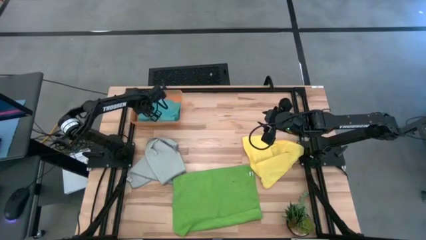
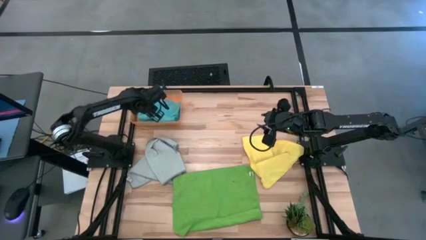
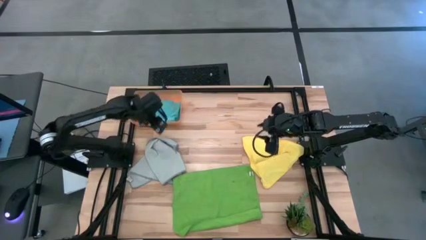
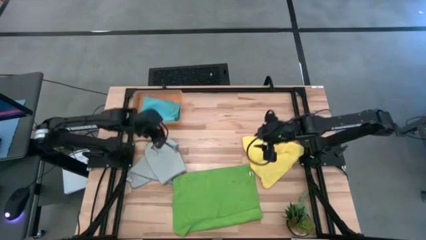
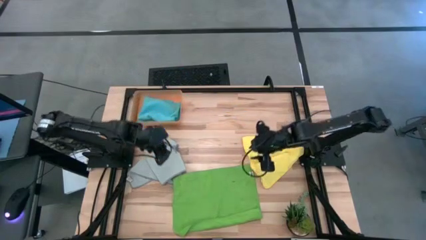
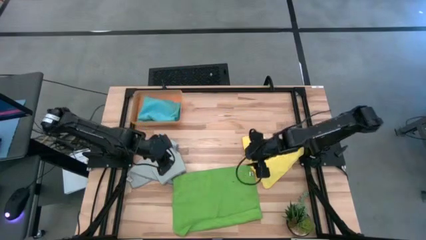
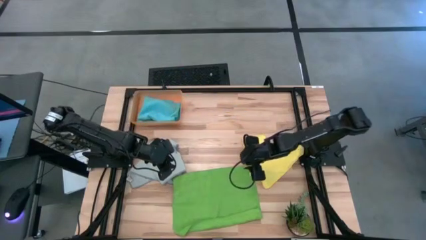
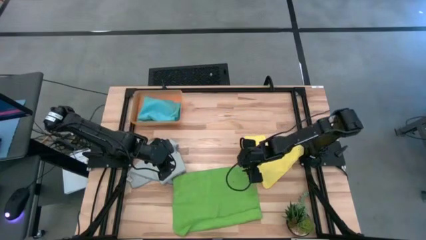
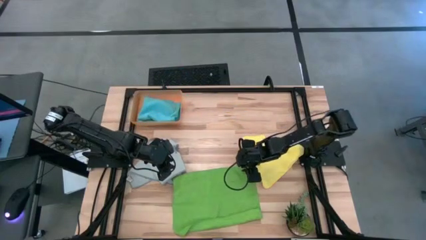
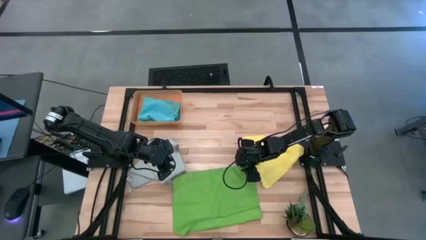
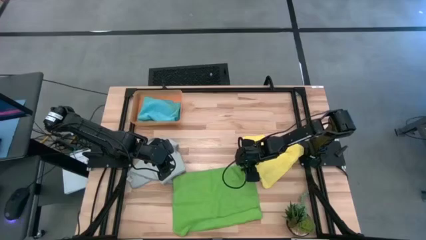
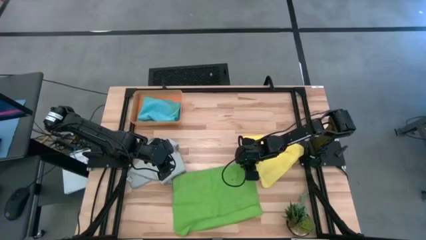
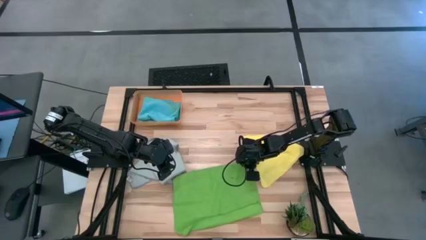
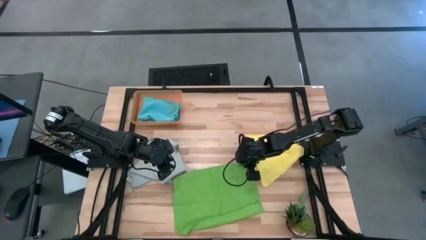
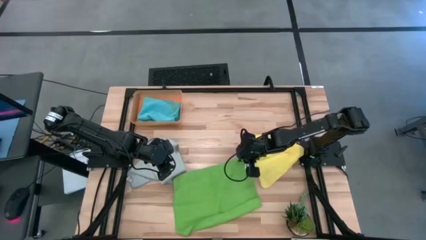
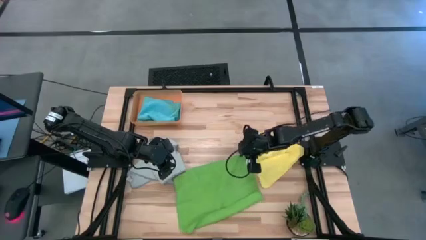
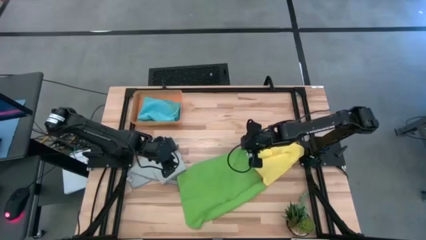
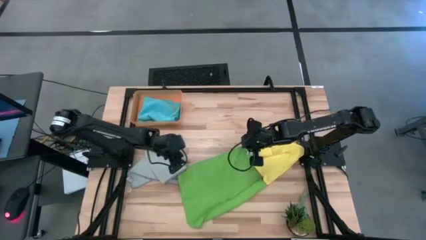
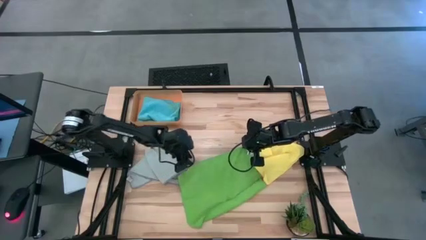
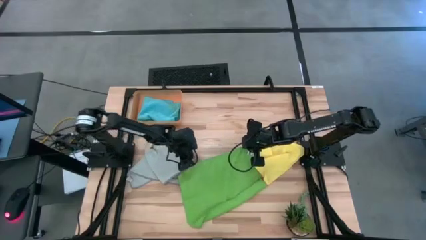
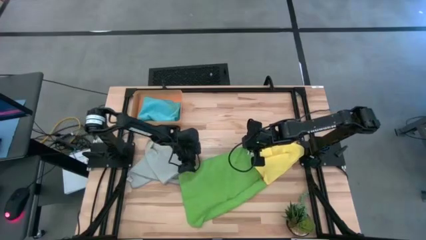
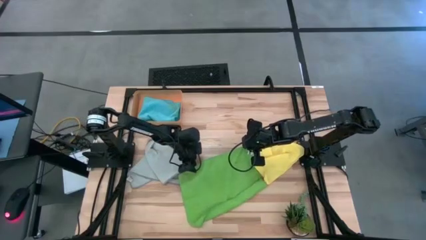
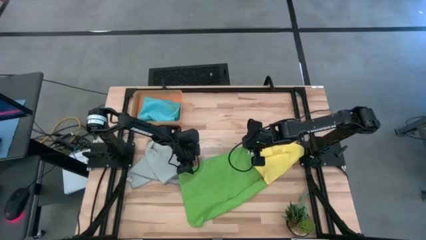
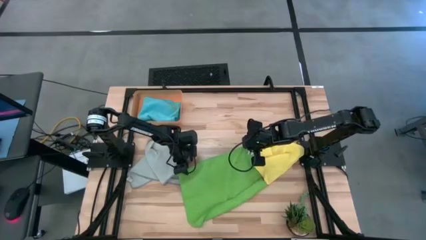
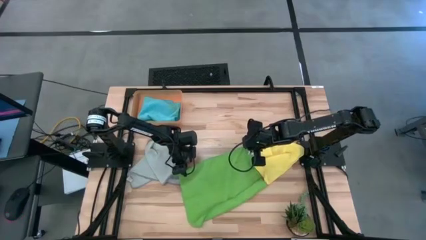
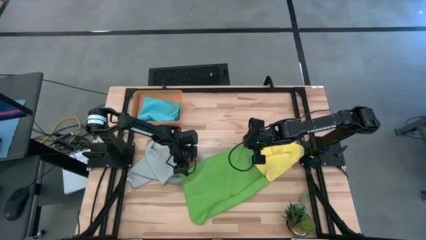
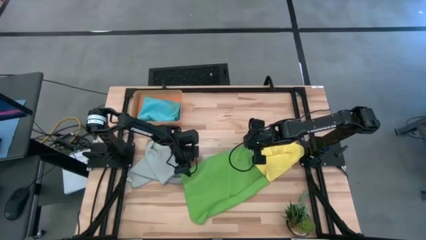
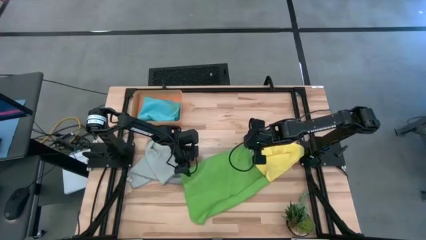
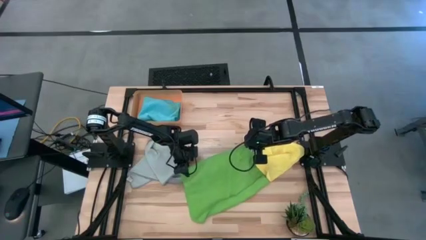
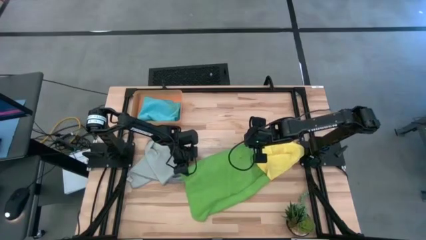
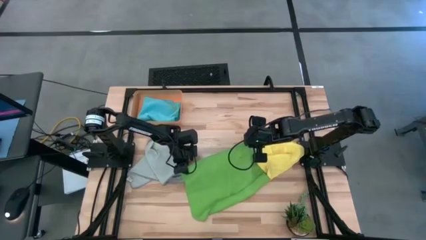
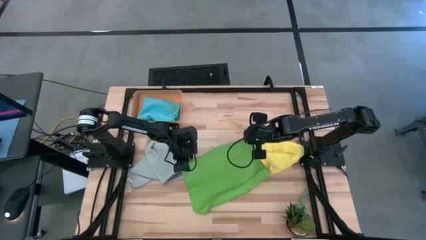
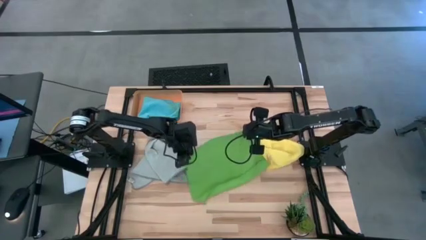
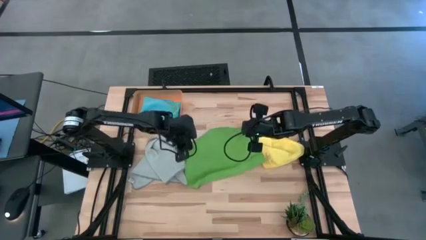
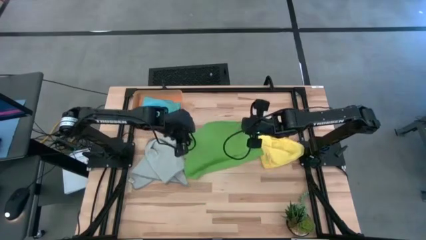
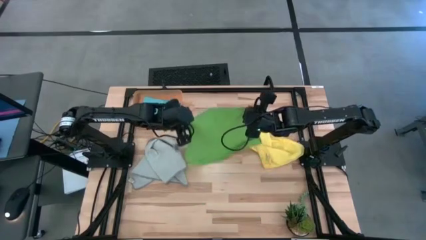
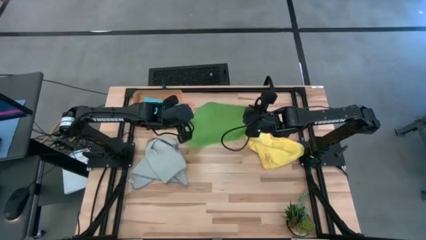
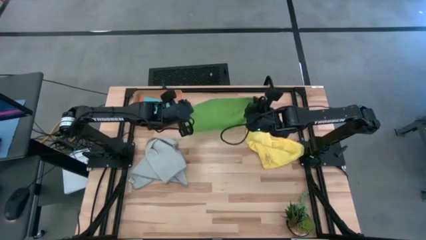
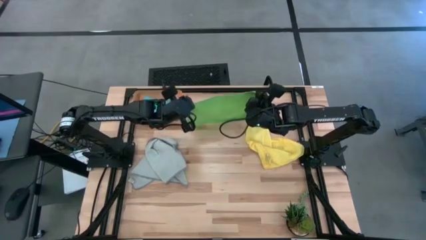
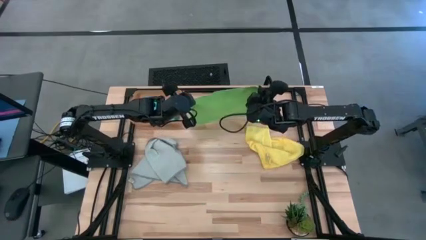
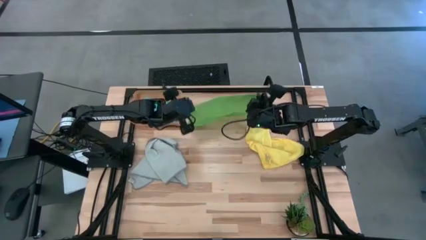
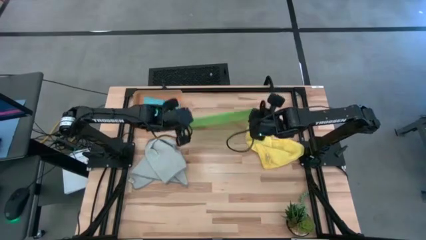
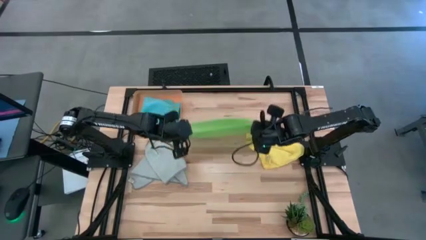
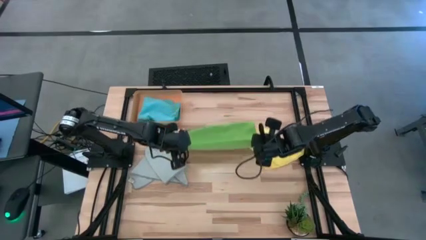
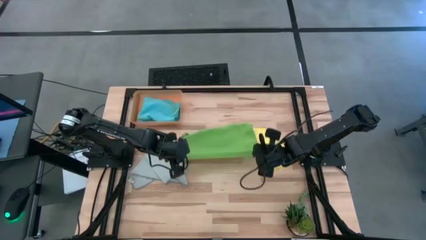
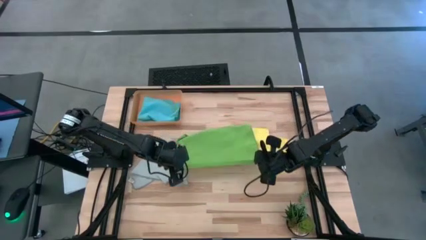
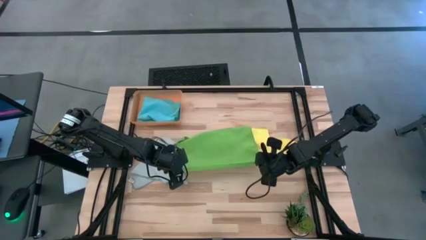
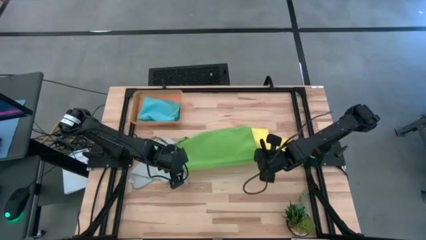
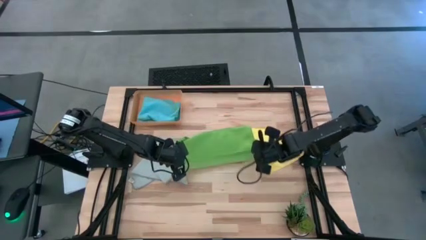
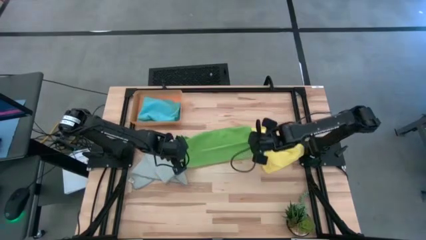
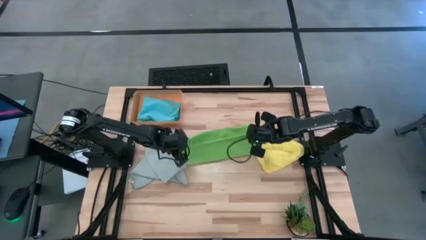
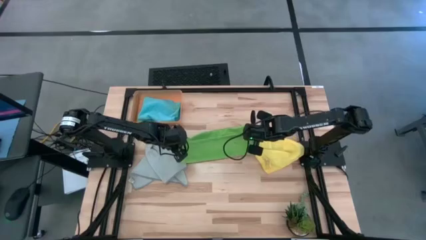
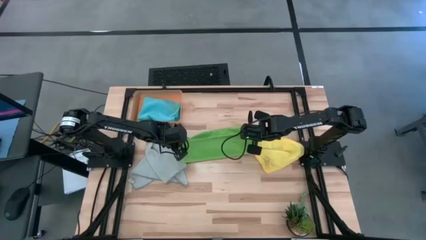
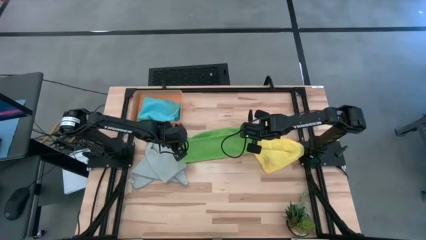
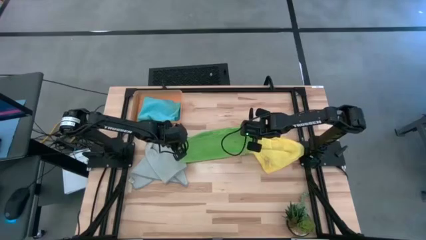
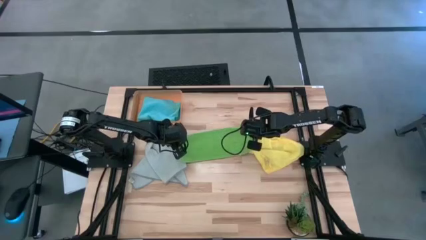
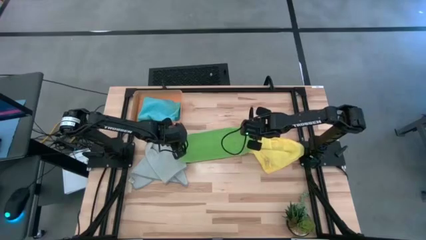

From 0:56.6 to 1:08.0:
Task: Fold microfiber towels
Fold the green microfiber cloth

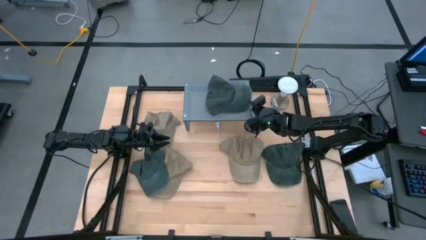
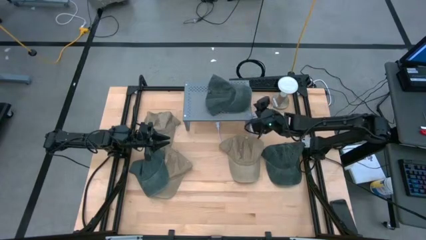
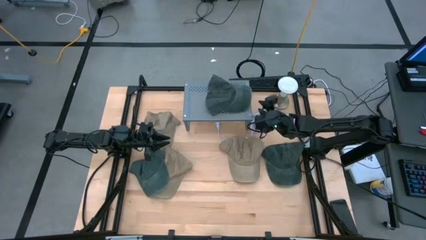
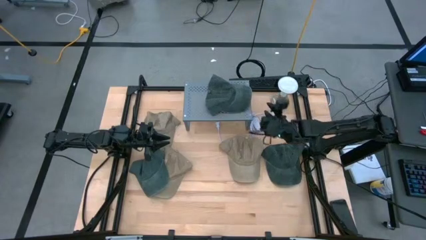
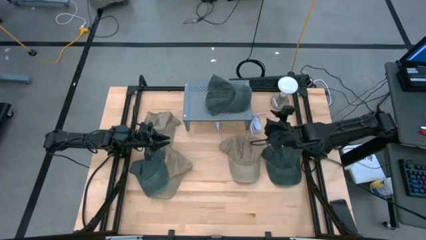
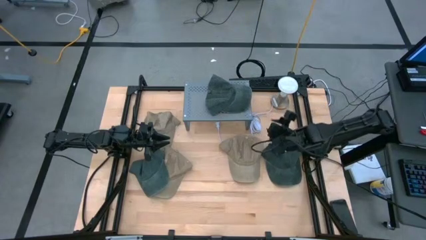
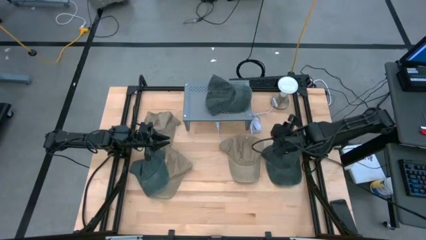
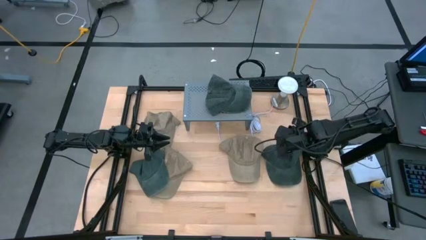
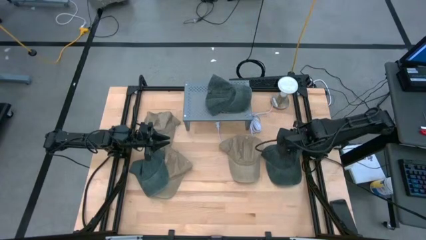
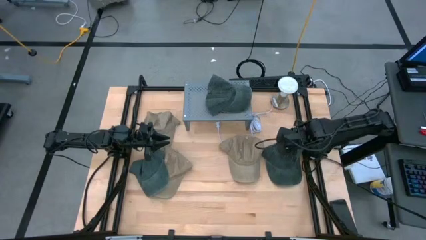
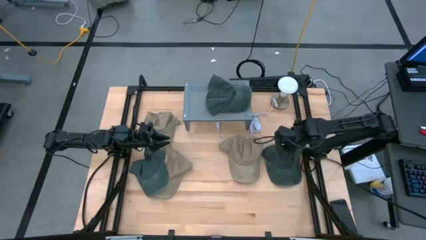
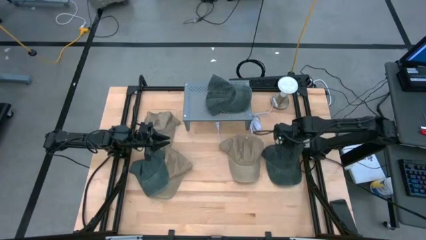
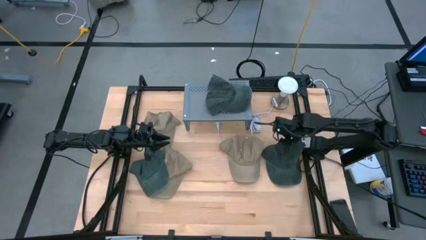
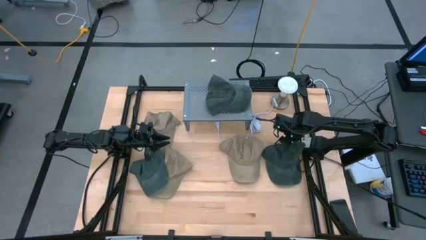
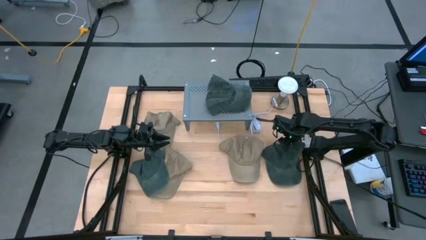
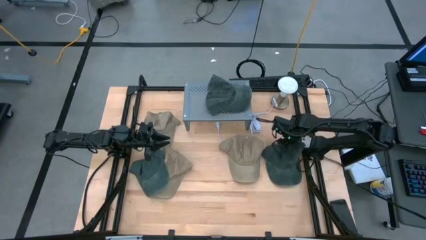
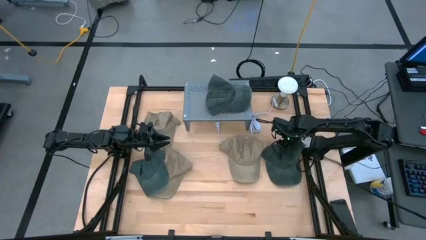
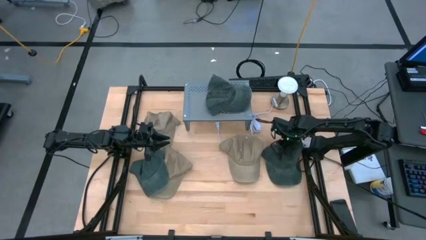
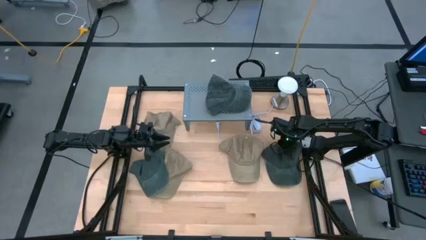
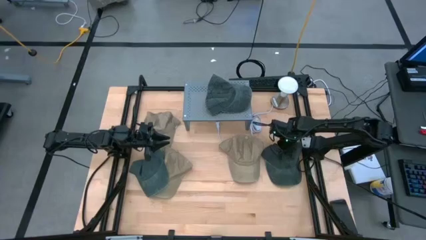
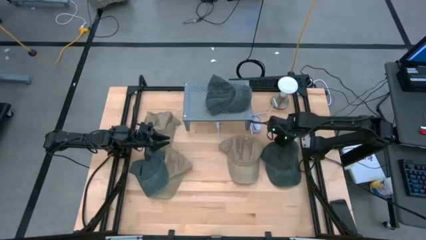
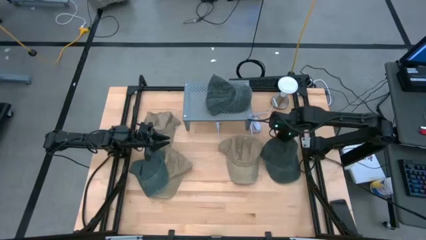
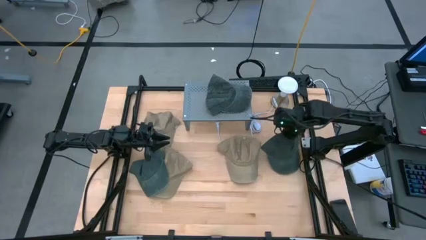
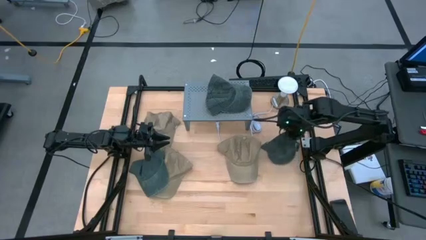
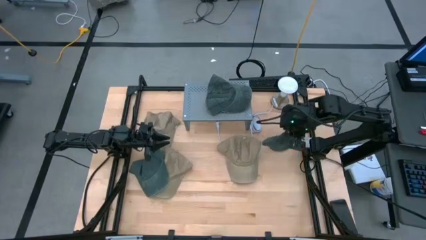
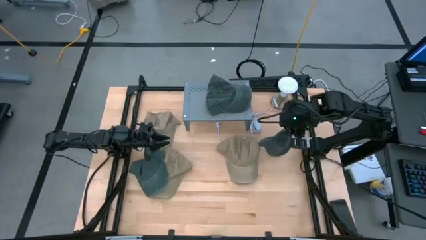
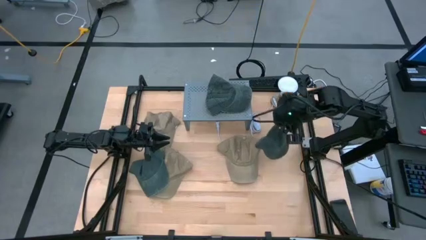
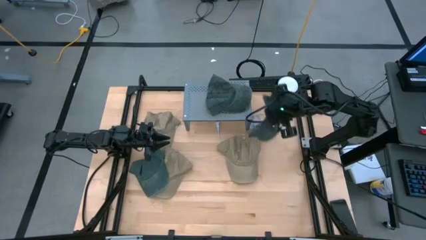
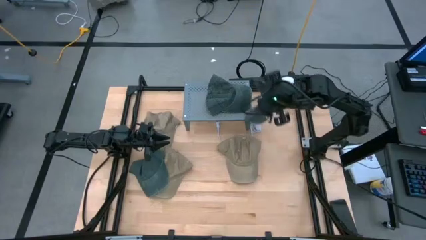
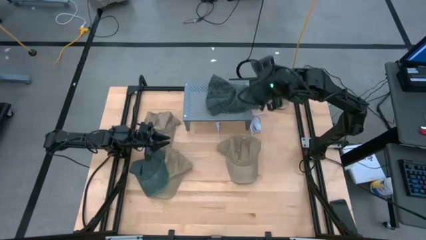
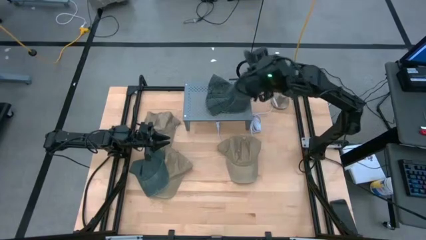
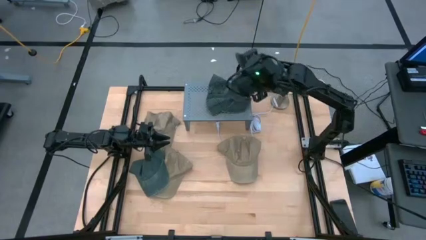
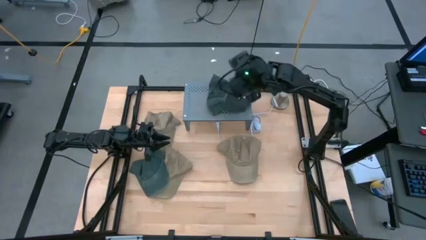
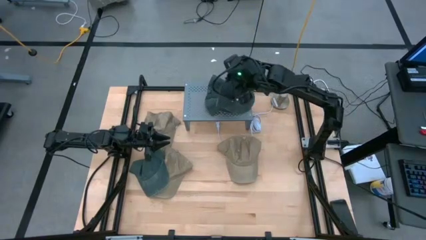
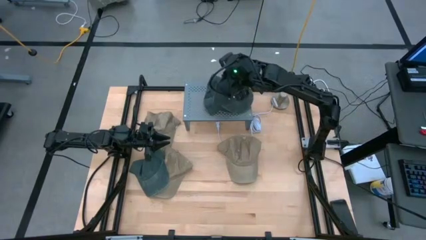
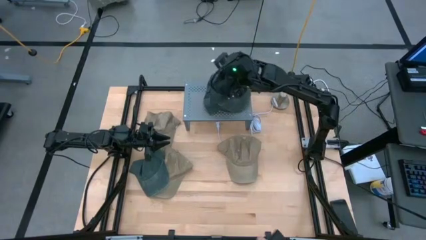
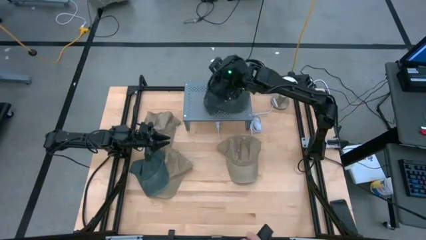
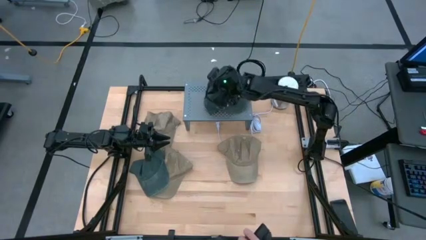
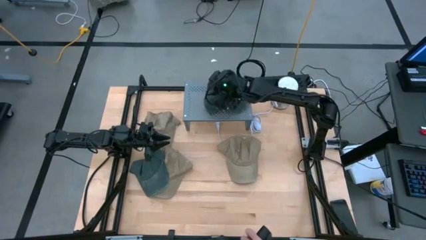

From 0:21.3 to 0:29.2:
Task: Pick & Place hat
Stack the right black cap on top of the black cap on the shelf
